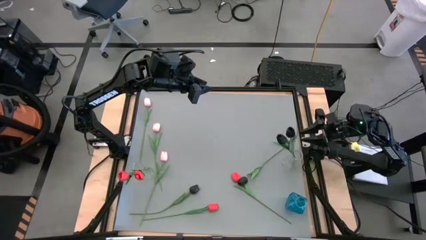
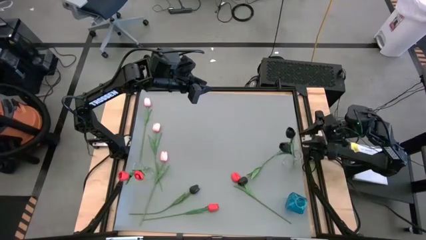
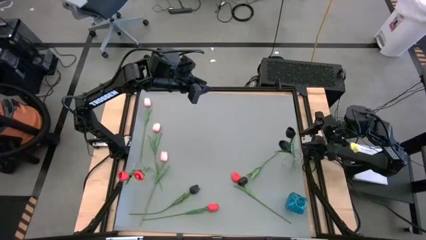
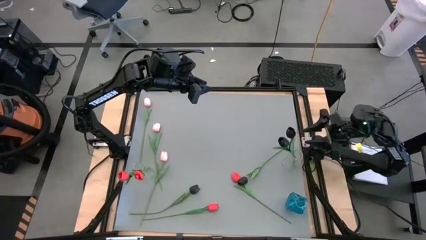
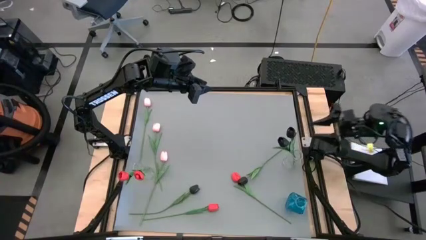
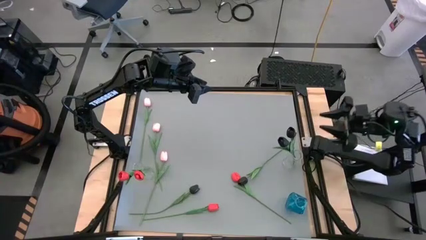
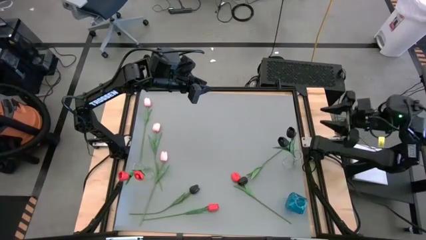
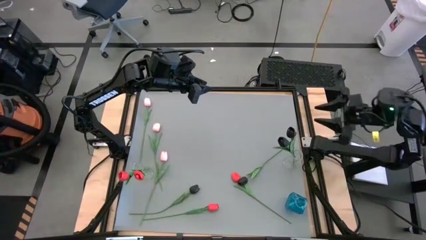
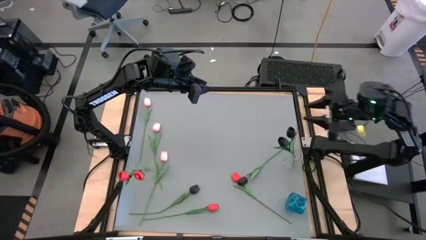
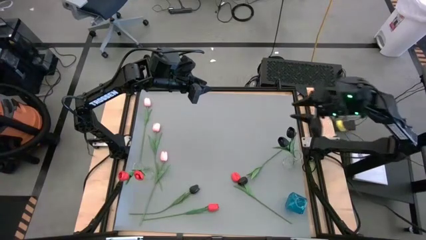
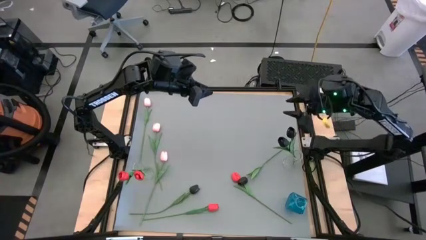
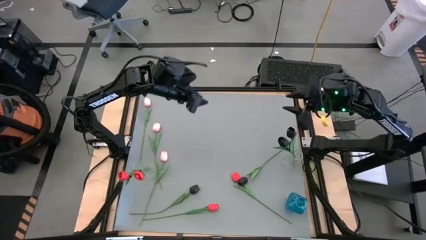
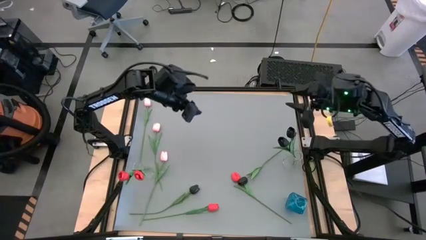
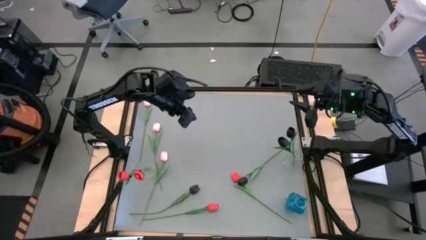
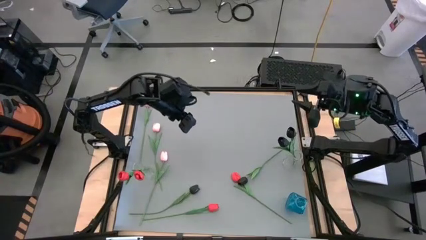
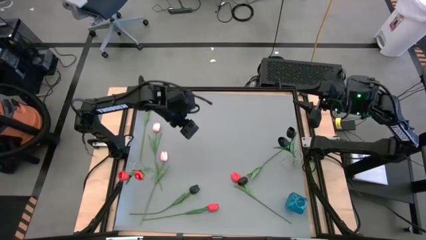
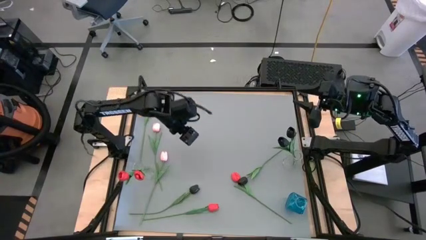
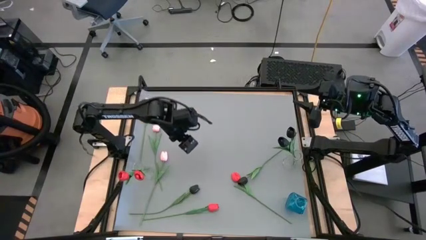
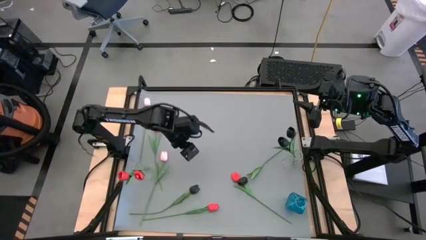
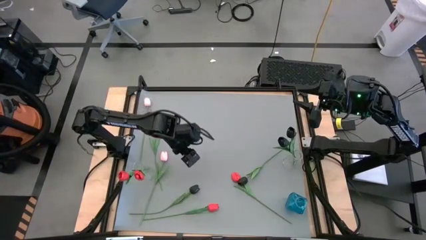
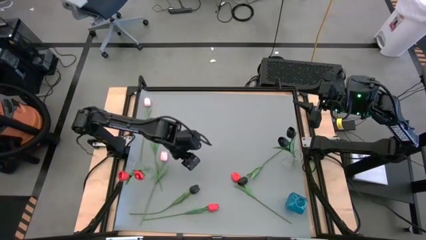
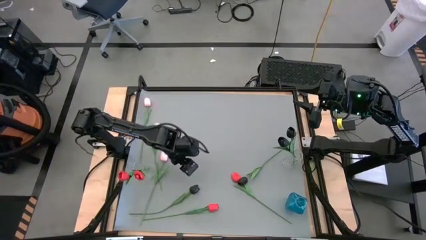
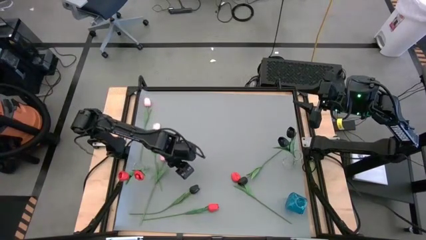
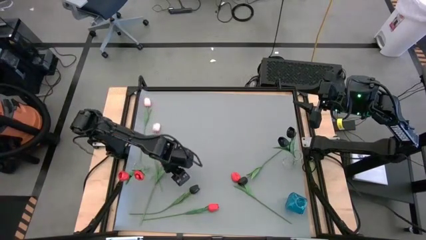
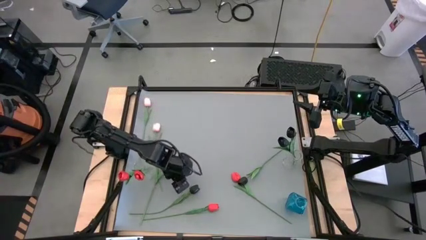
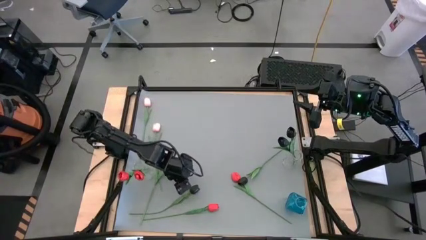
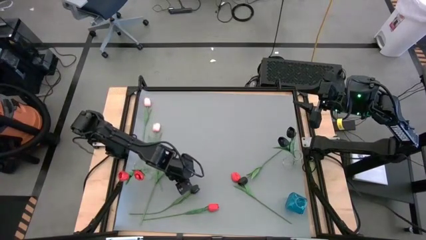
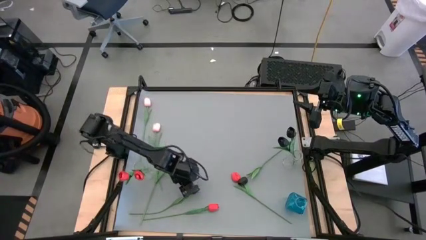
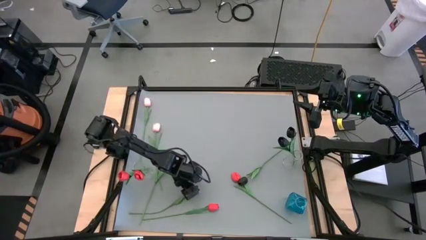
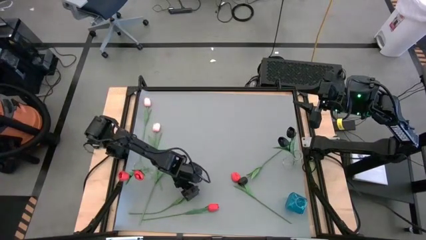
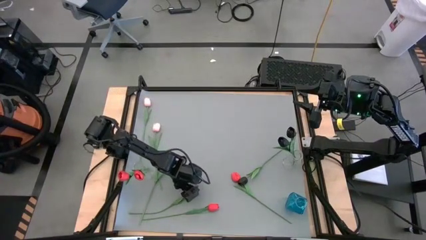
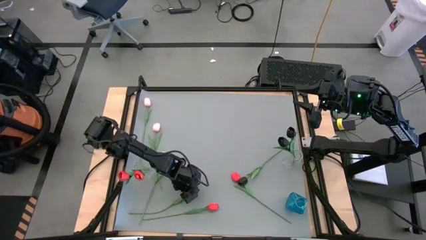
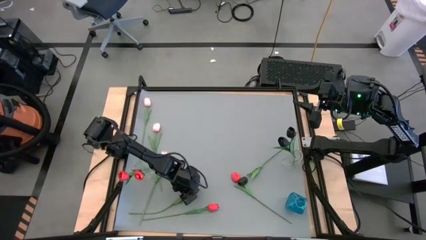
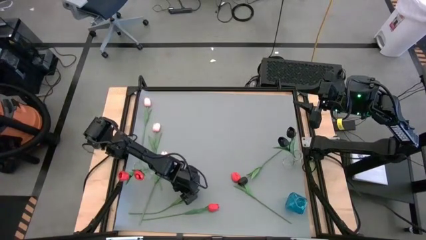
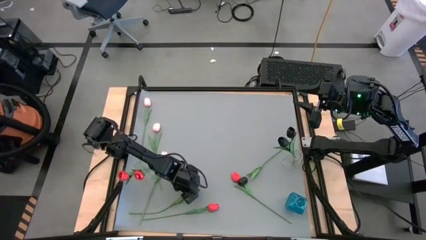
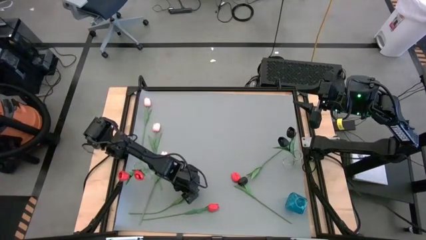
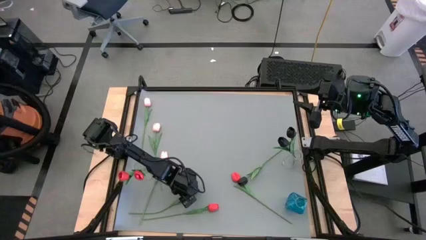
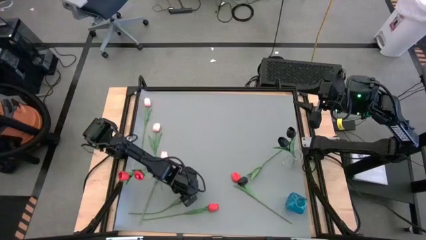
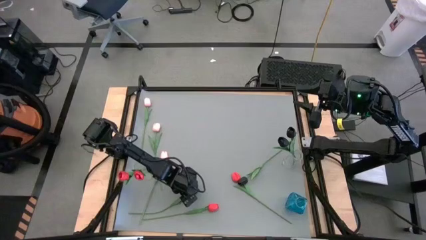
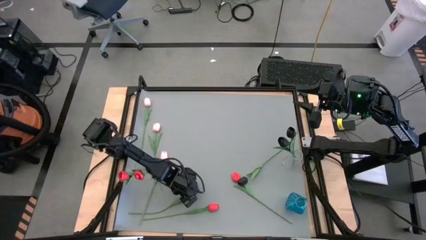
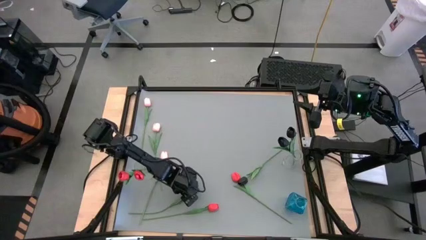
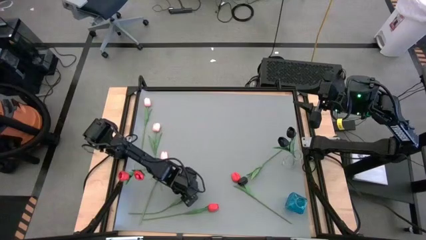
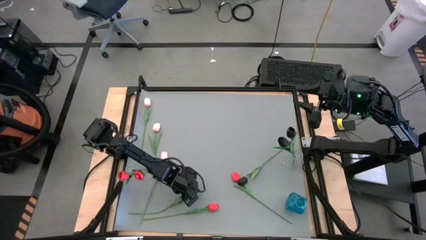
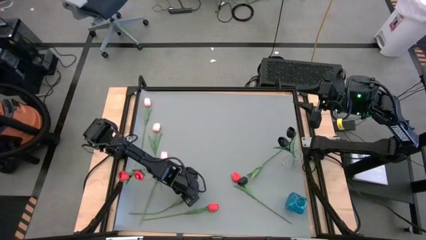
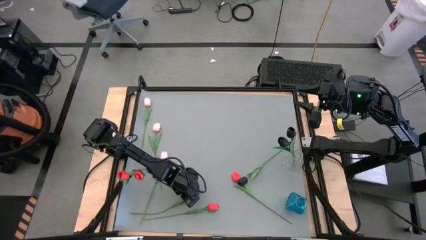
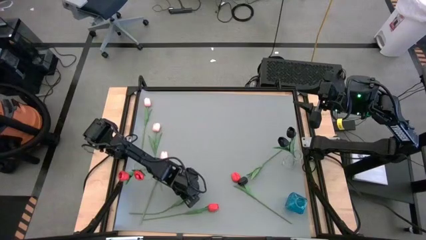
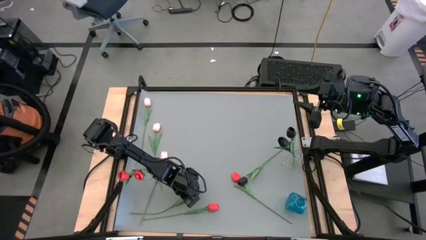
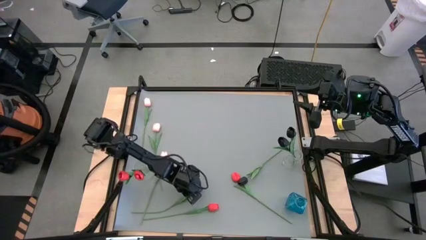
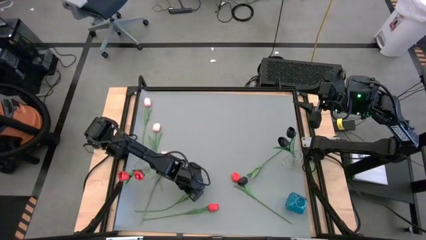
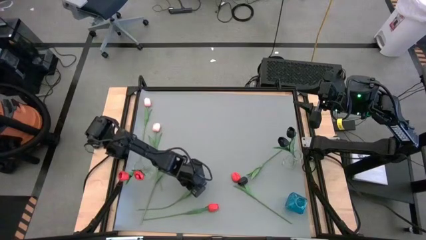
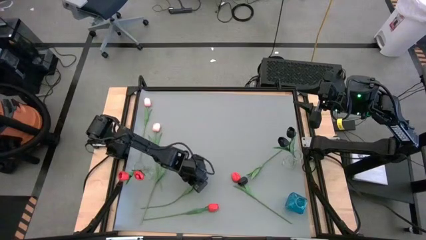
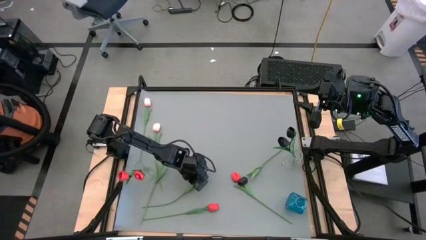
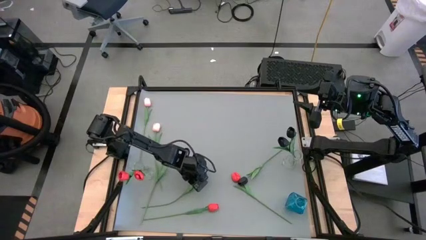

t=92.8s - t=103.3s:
Task: Sort flowers into vase by color
Put the left black tulip into the right transparent vase
